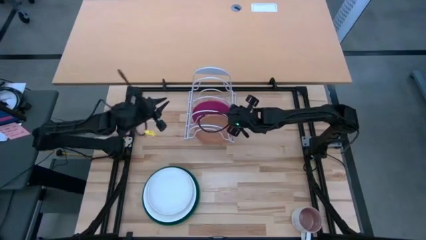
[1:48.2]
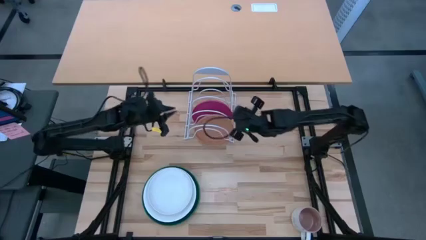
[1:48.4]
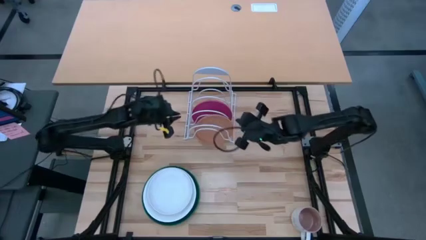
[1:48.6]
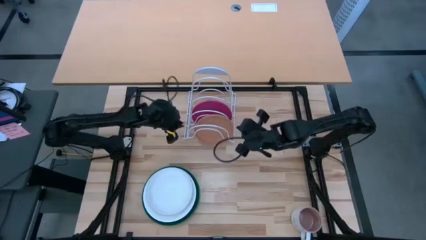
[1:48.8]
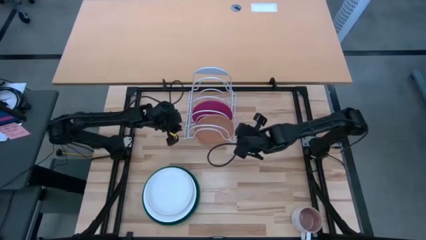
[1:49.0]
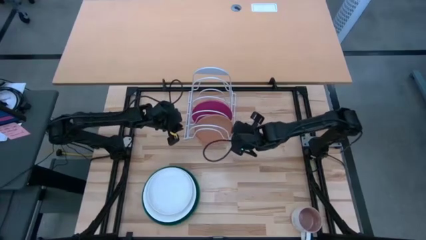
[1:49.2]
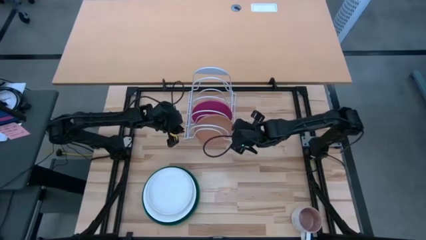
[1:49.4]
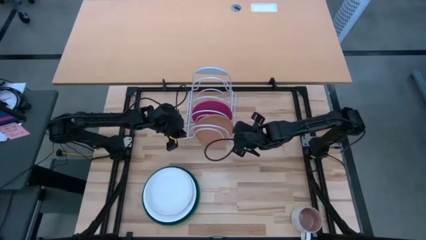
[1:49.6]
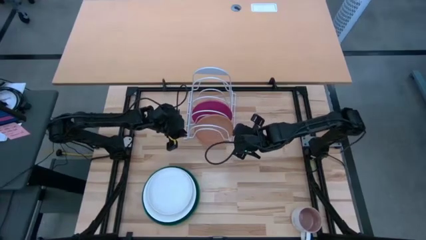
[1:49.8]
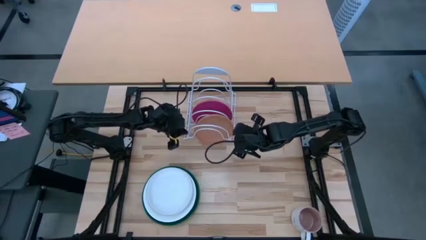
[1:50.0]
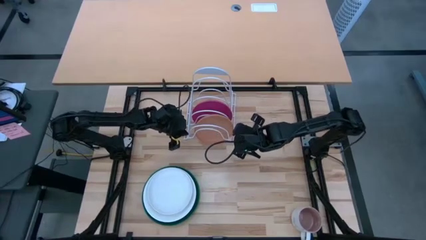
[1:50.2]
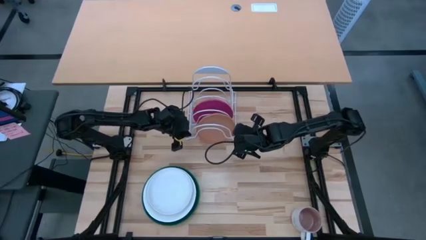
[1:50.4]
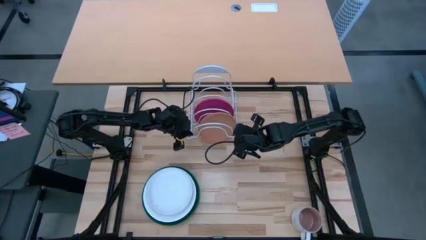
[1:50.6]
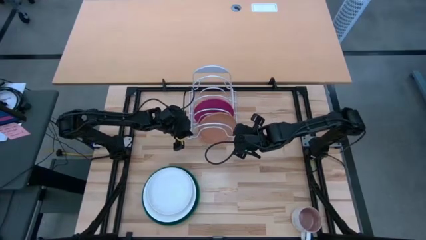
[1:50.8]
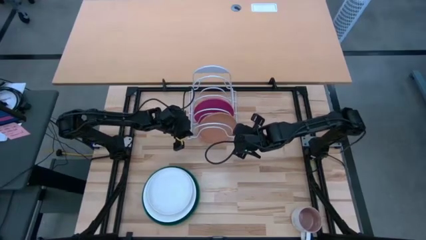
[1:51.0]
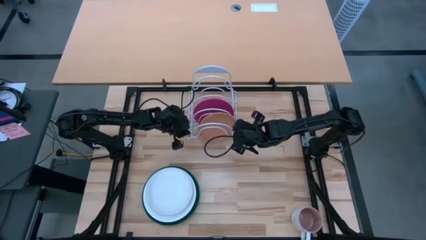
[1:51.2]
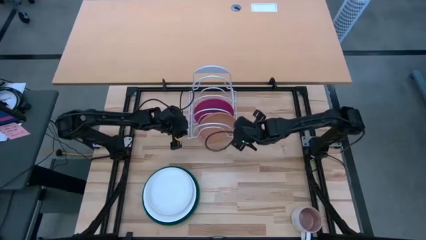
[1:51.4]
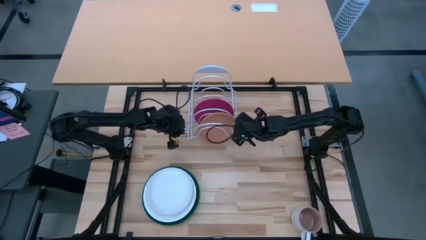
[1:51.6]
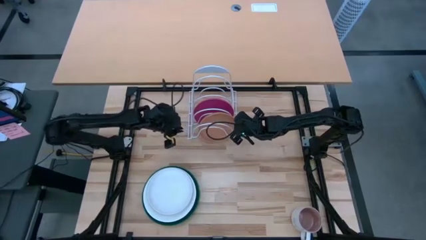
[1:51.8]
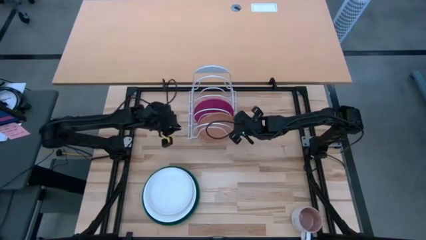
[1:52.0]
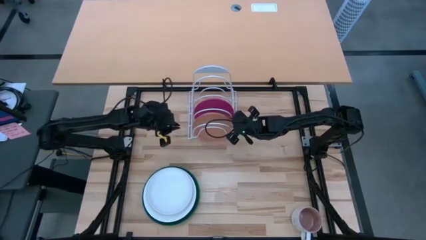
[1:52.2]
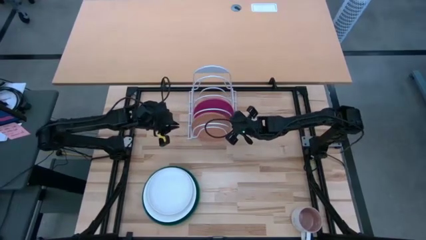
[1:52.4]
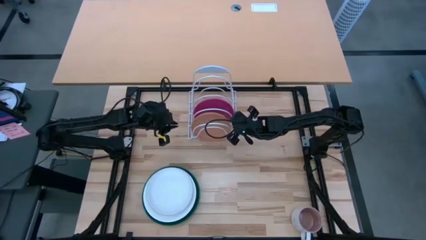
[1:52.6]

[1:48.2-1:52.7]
Task: Sort dishes
Adjust the dish rack

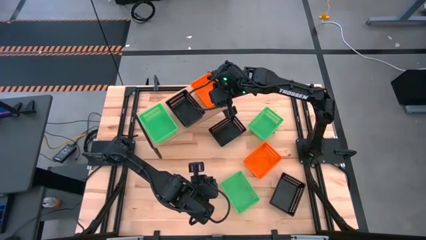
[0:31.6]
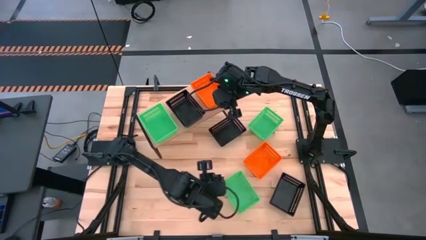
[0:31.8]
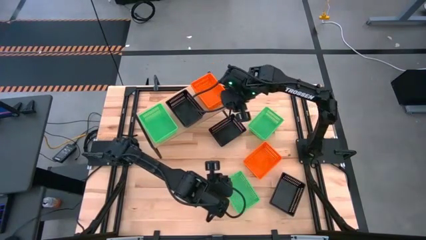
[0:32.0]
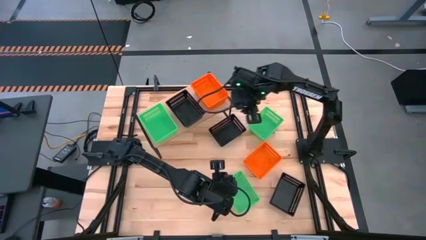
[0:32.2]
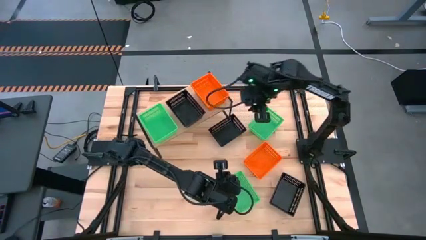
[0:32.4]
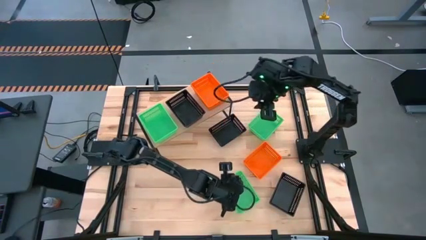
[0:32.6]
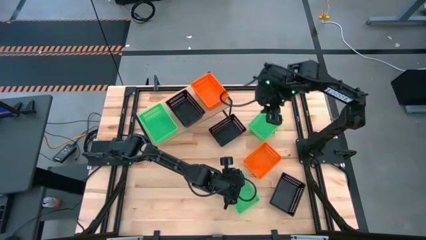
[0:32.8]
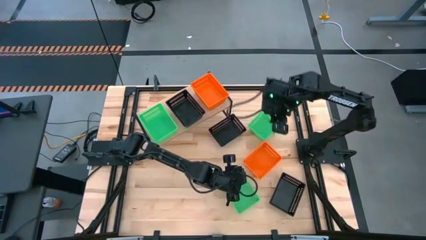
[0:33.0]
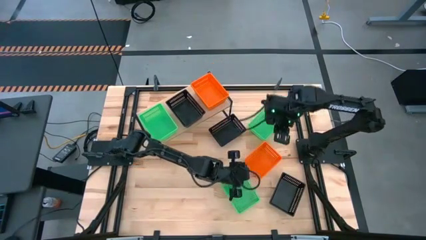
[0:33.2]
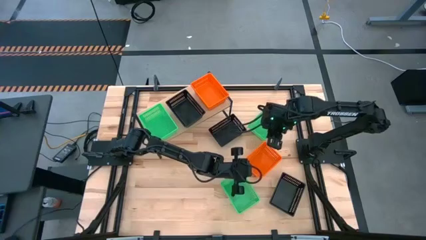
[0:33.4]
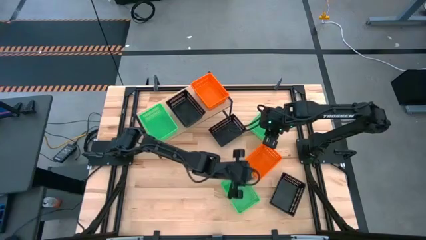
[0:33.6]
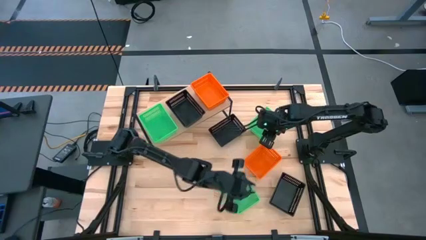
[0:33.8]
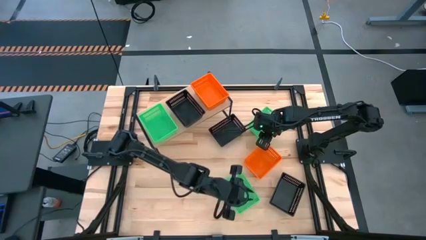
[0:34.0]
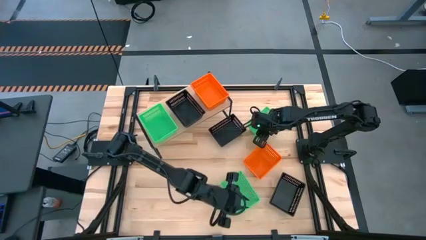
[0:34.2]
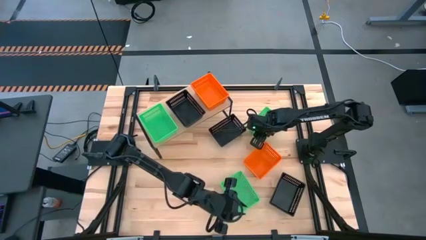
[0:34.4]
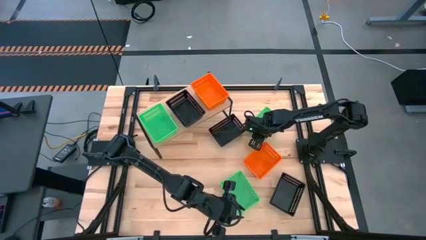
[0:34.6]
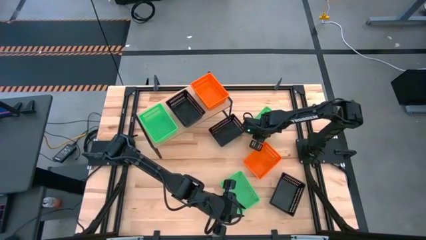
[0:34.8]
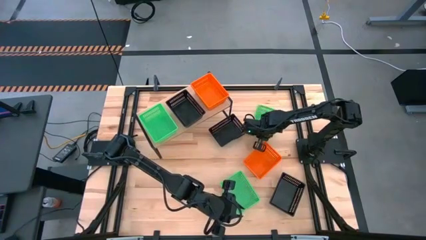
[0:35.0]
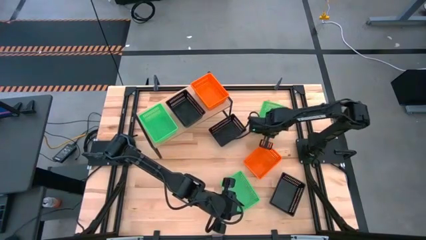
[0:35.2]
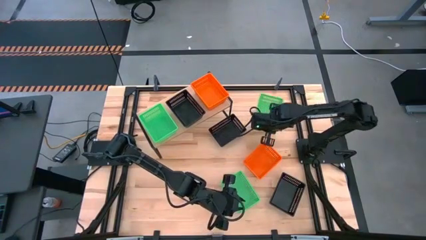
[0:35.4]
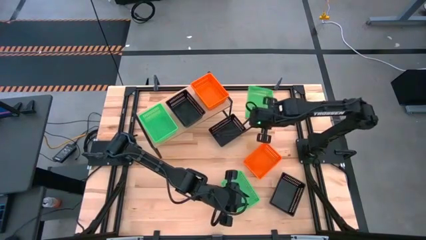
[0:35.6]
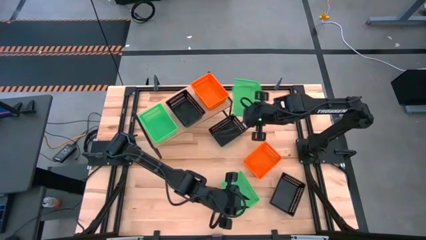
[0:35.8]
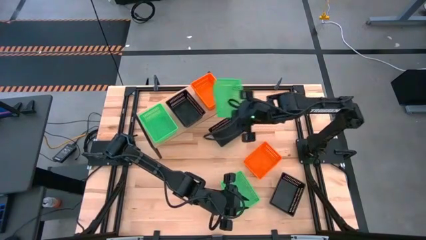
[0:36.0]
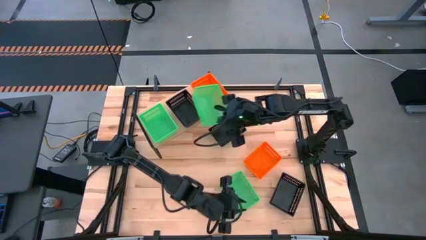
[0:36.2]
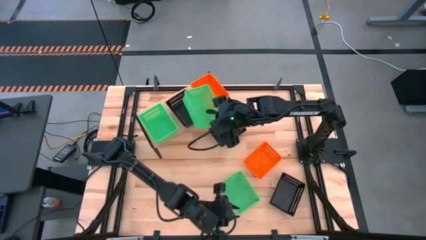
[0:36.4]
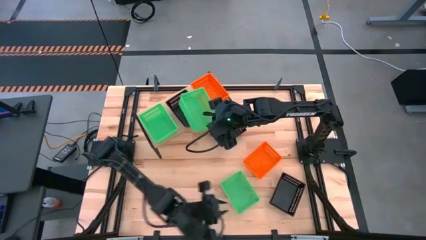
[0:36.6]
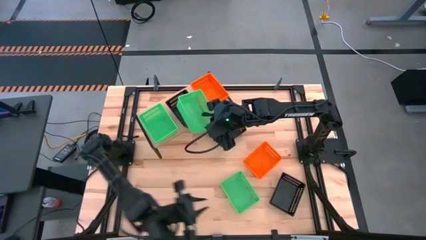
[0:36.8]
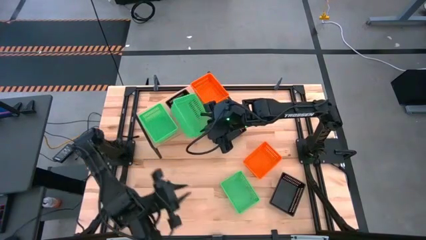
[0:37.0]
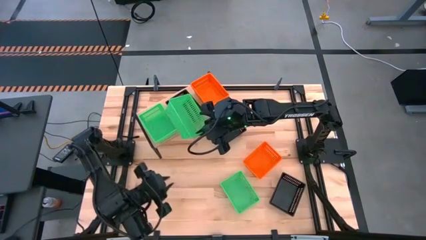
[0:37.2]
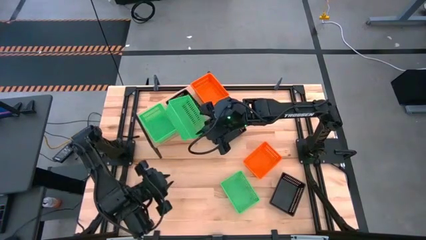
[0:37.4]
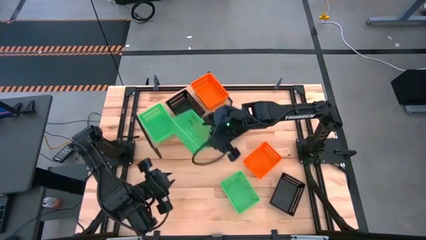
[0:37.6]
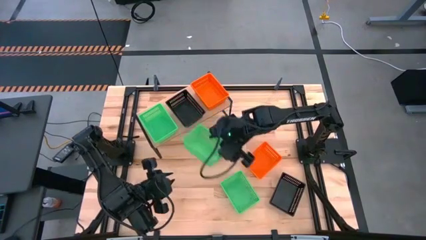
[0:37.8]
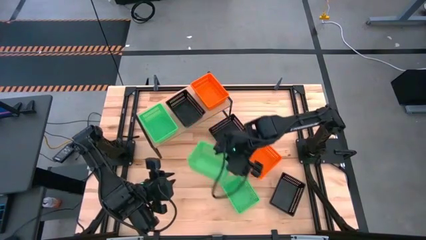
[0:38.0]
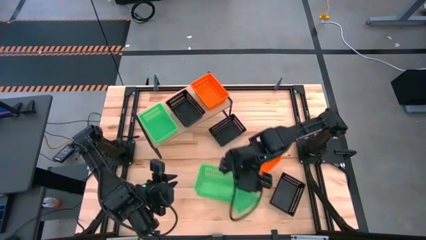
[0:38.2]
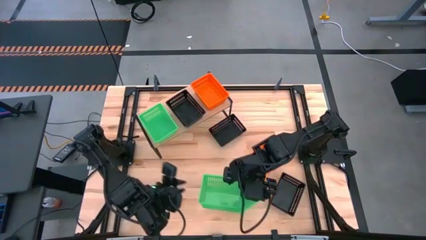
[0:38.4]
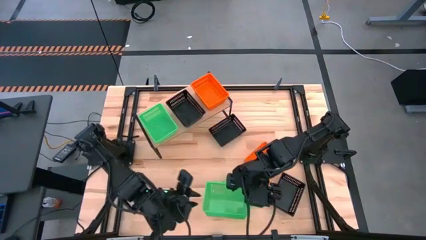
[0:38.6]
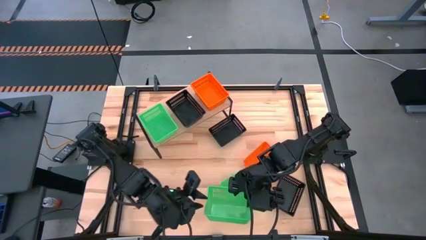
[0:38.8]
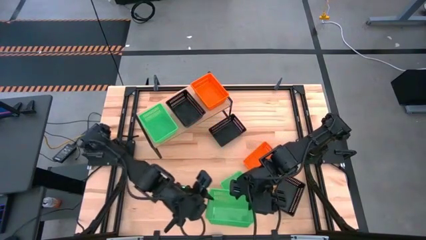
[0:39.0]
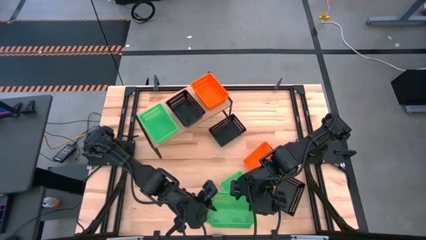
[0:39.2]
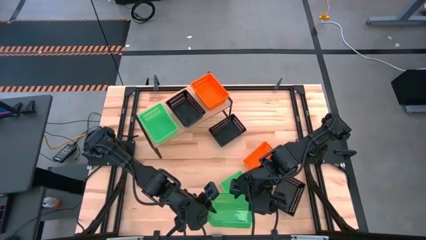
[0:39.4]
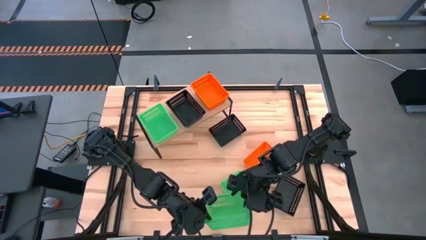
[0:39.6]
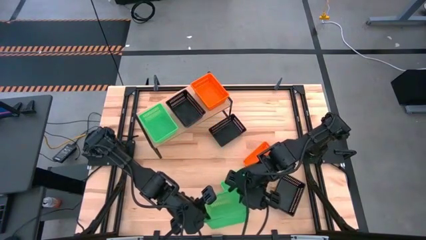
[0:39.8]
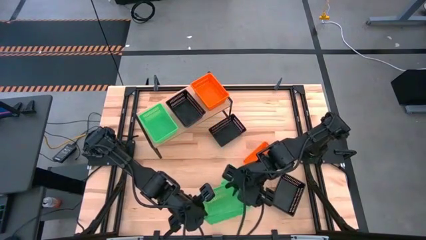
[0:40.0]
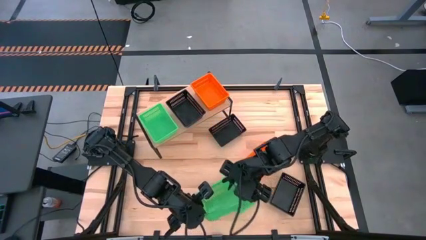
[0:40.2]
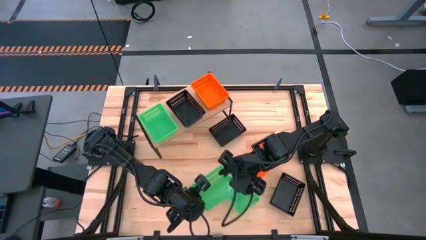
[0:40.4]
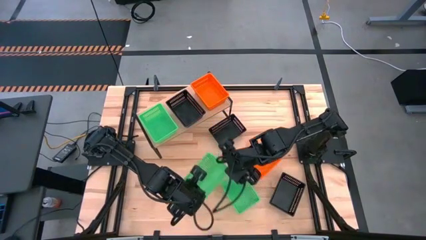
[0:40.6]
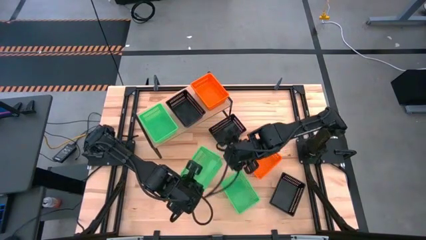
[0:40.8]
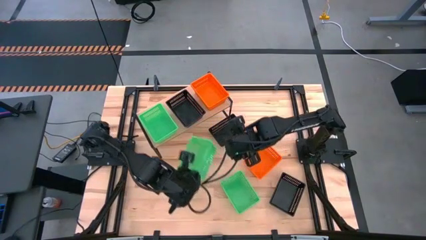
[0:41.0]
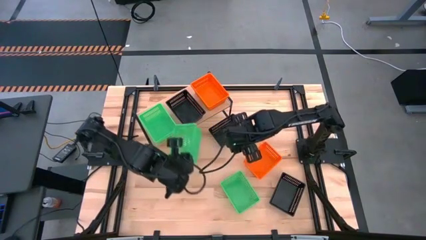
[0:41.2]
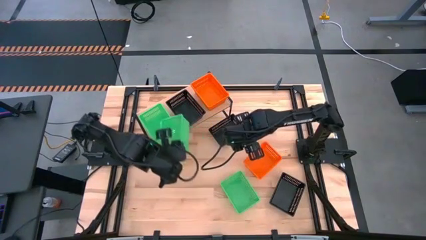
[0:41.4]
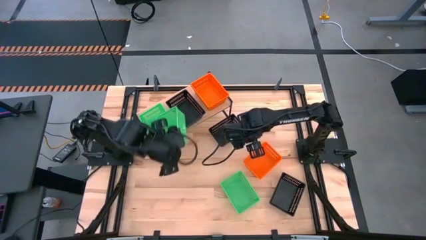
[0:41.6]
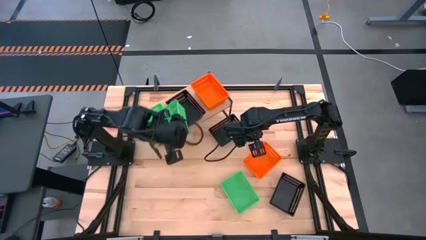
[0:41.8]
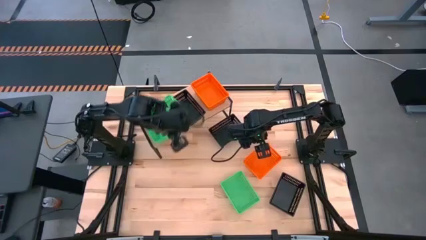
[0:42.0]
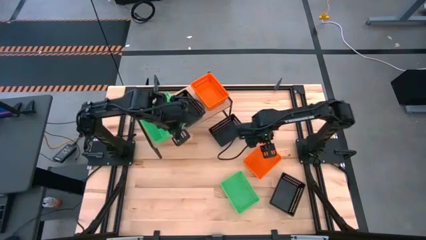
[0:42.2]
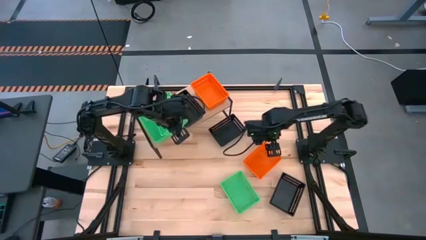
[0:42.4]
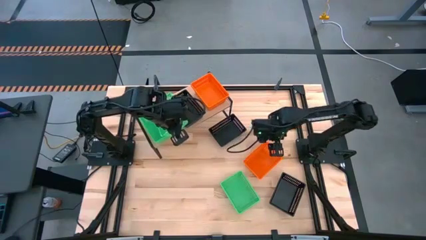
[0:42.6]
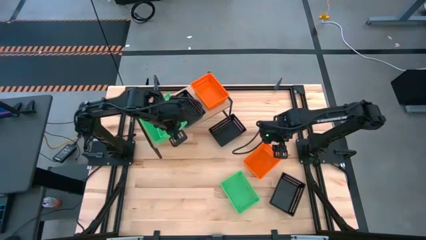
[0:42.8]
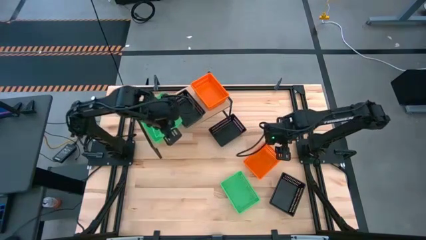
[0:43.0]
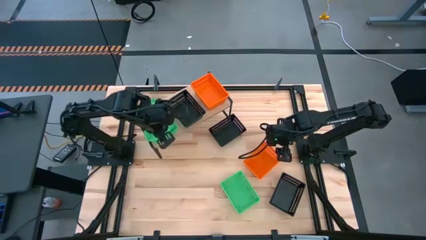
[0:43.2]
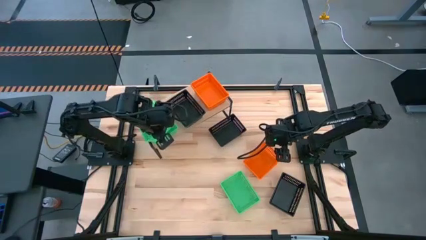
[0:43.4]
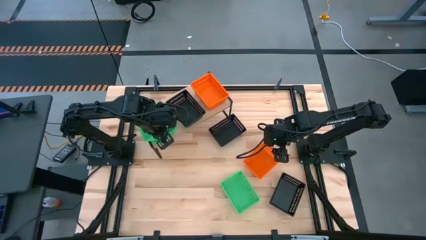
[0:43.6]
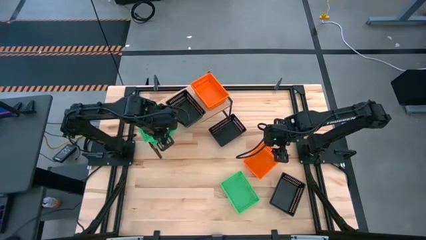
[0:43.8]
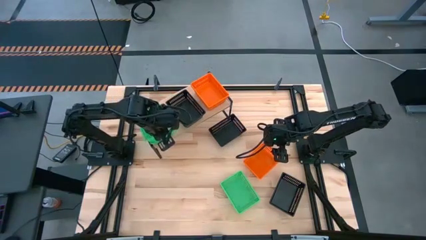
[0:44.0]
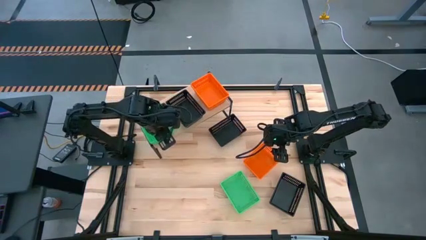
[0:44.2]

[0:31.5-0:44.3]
Task: Stack baskets on shelf by color
Stack the top green basket on the green basket on the shelf
